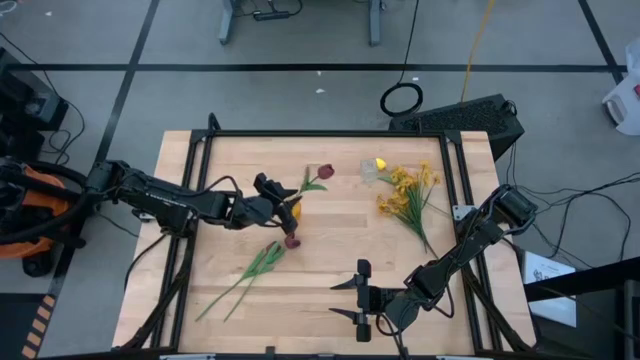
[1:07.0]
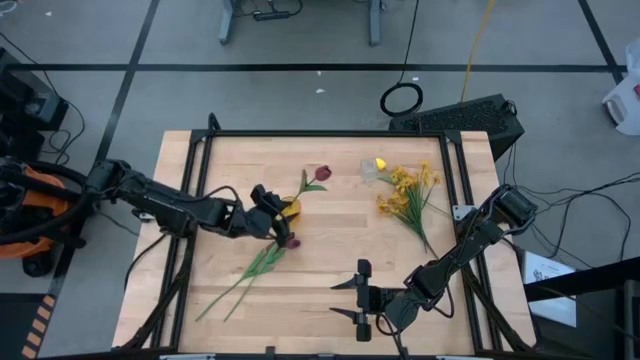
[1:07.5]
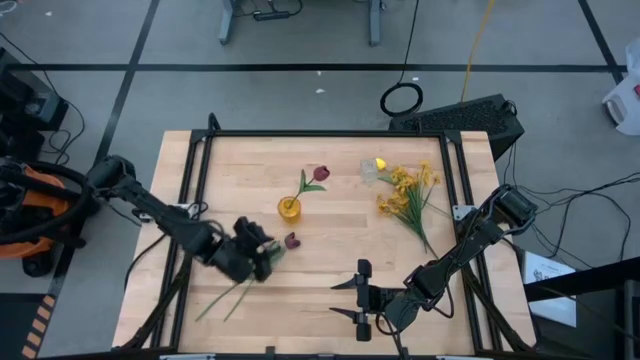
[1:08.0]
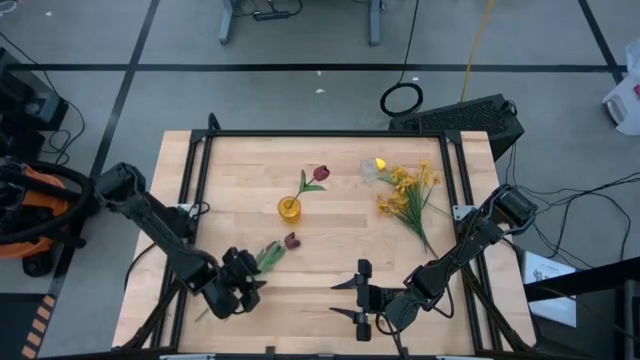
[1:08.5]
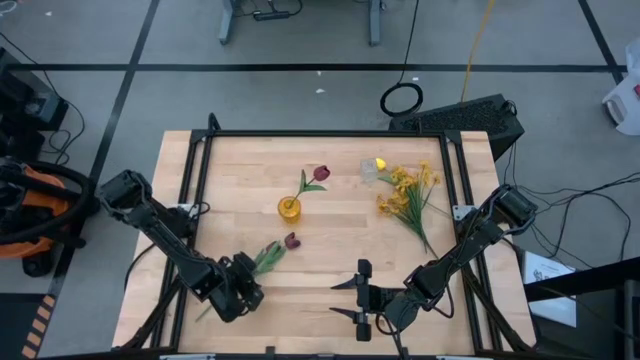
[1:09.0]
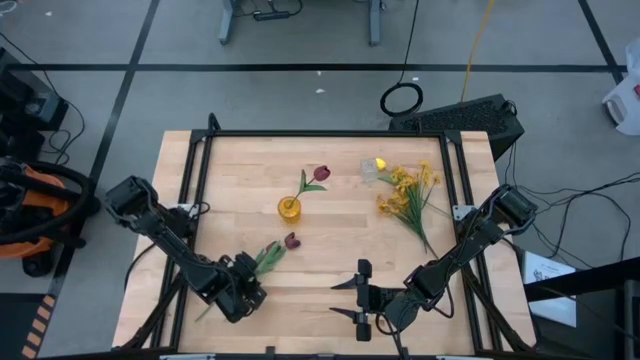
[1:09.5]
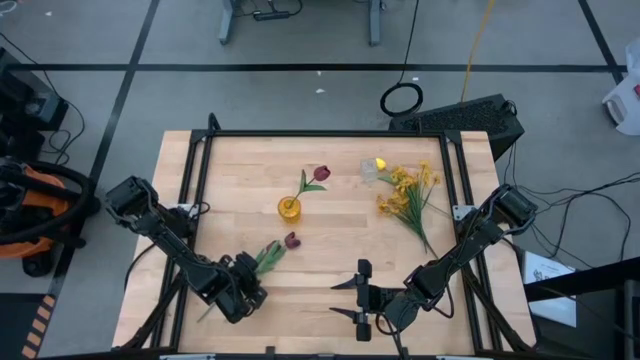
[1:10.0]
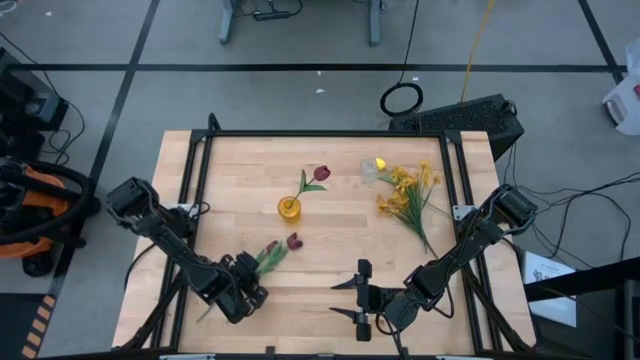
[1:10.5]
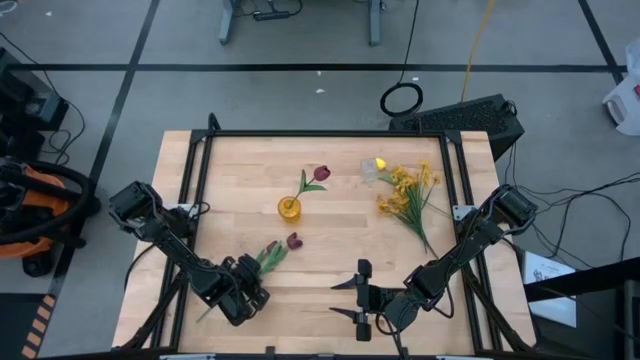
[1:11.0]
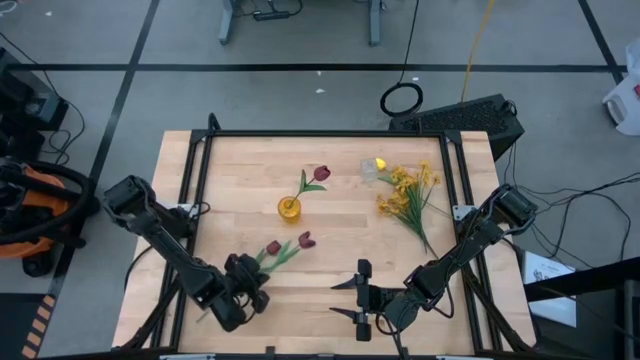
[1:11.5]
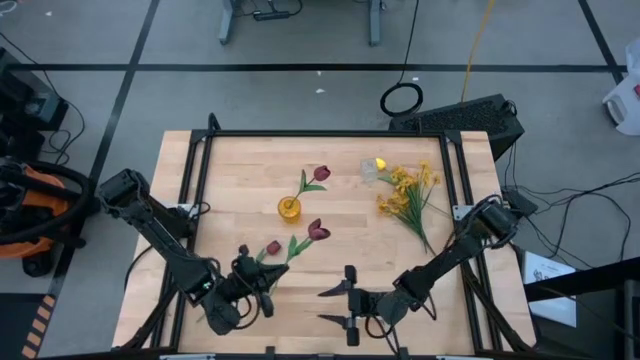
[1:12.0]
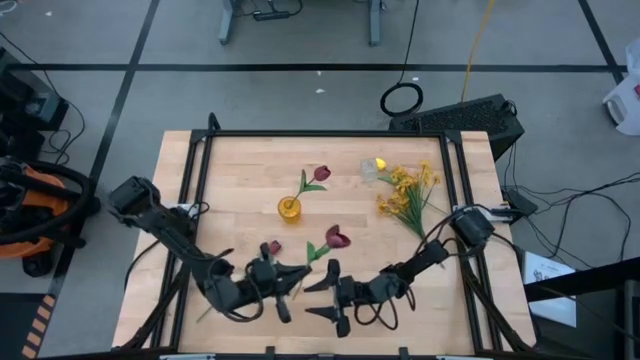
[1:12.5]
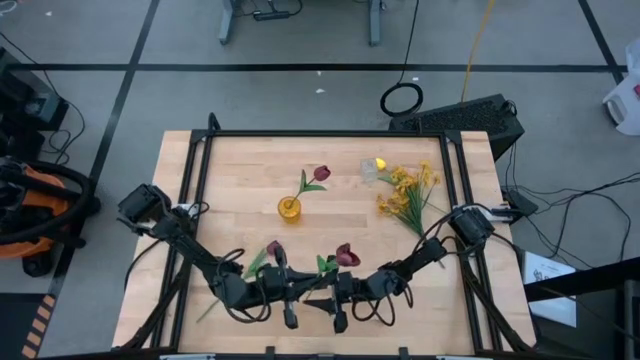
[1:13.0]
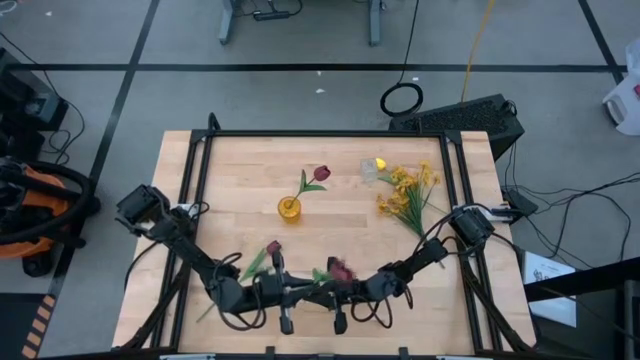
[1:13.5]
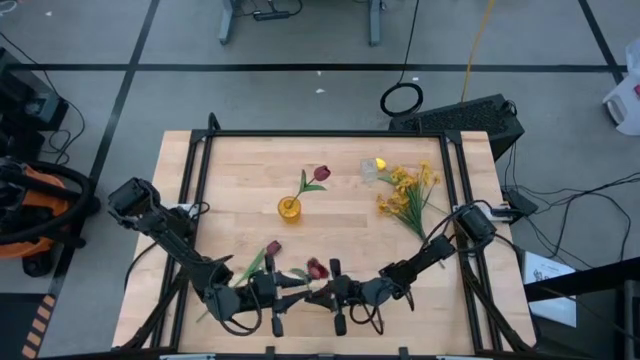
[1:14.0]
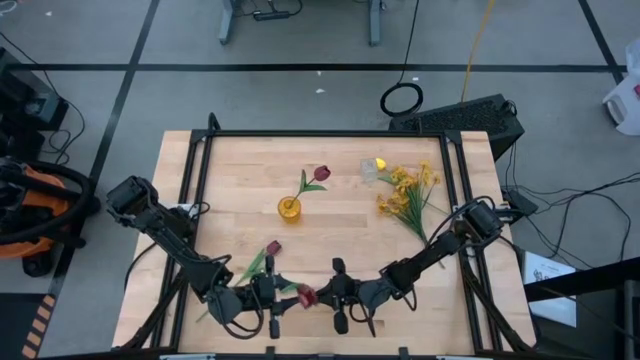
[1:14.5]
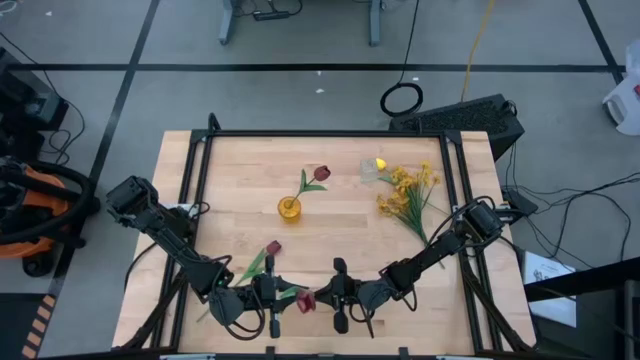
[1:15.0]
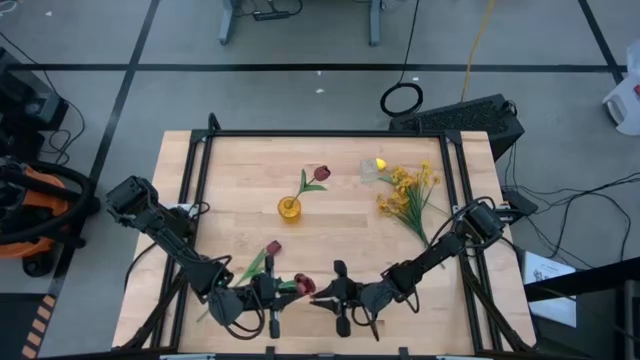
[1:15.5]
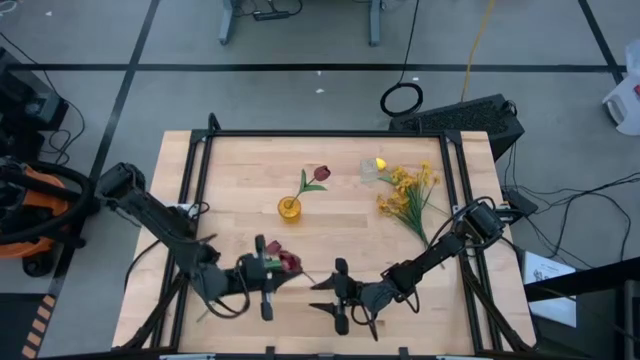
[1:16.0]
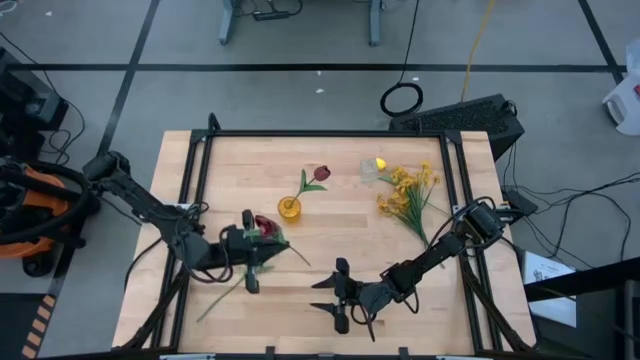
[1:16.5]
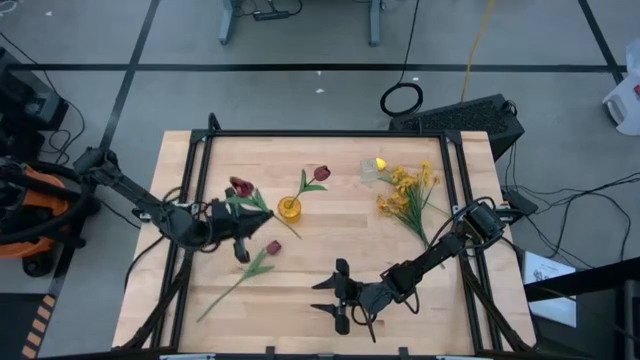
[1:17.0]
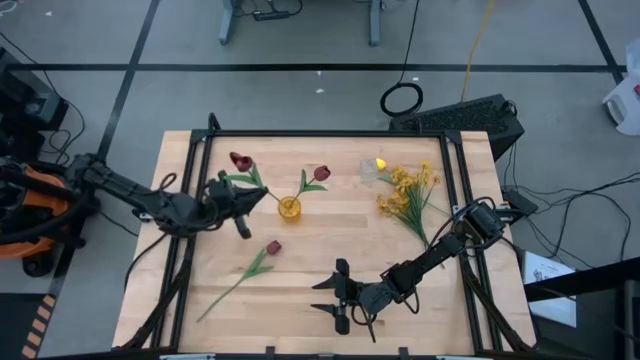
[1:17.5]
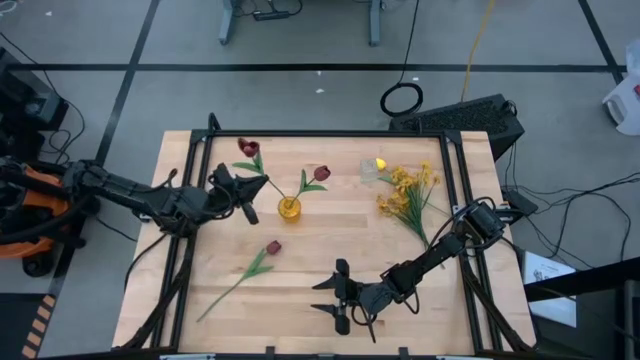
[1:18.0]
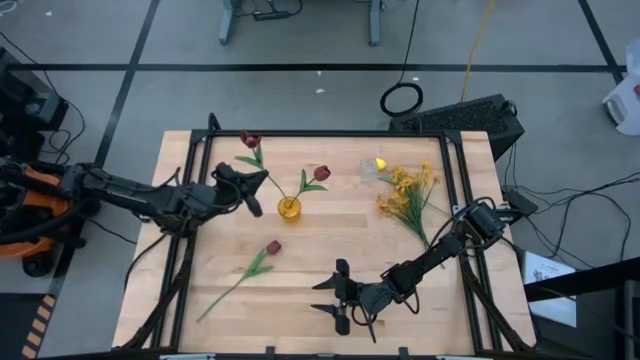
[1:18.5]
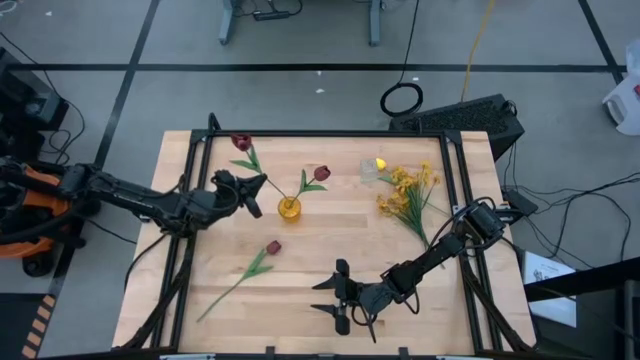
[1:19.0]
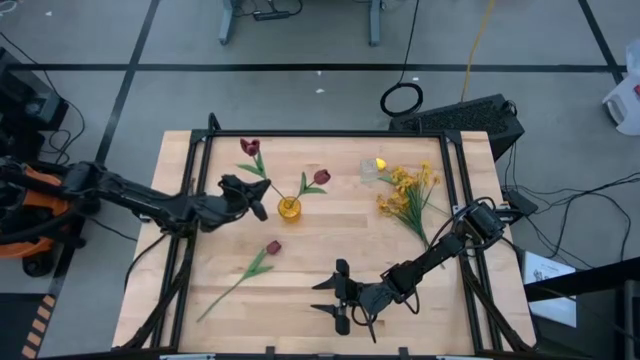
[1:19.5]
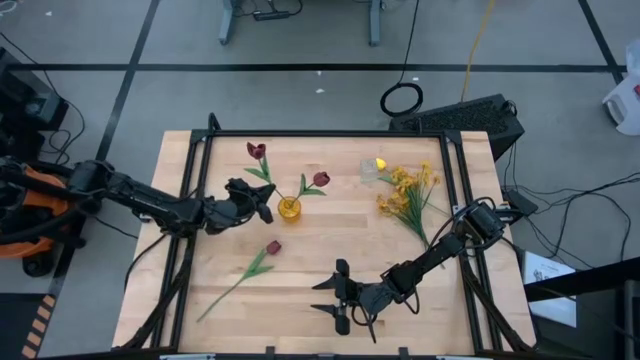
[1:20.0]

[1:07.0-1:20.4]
Task: Sort flowers into vase by color
Put the violet tulip into the yellow vase

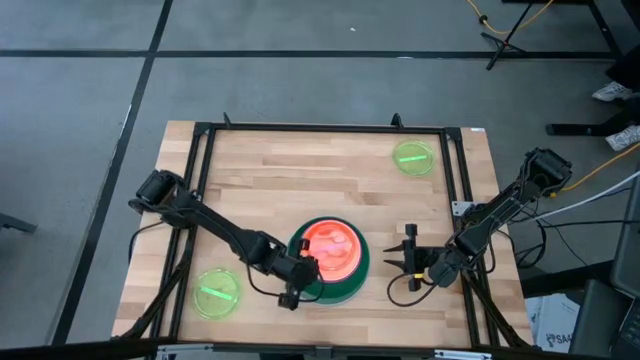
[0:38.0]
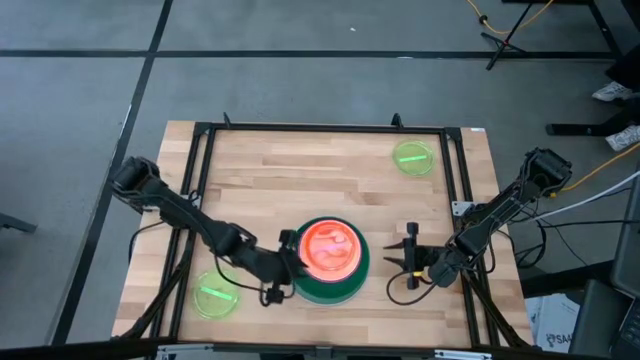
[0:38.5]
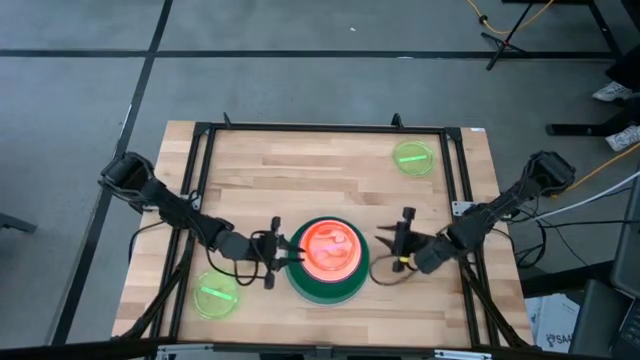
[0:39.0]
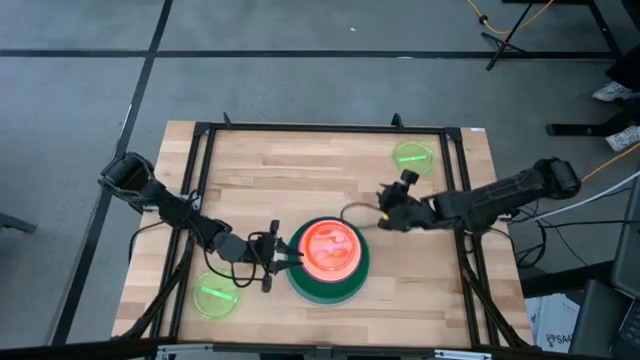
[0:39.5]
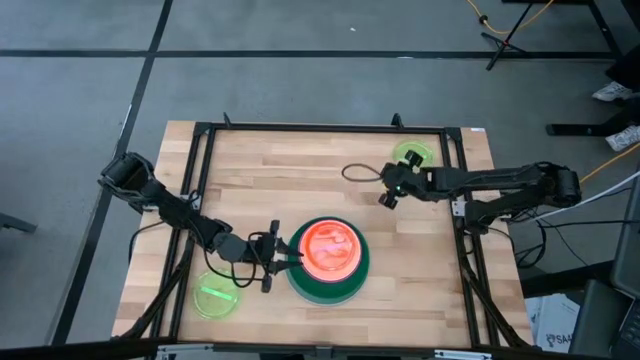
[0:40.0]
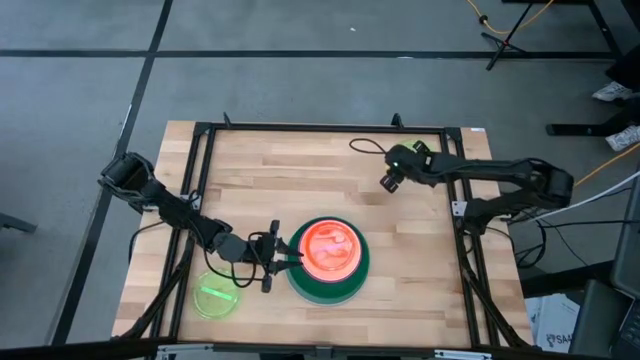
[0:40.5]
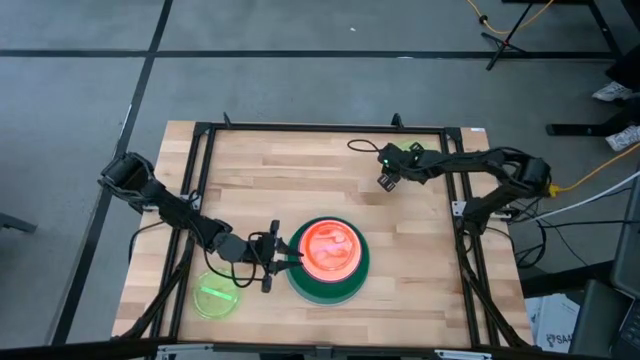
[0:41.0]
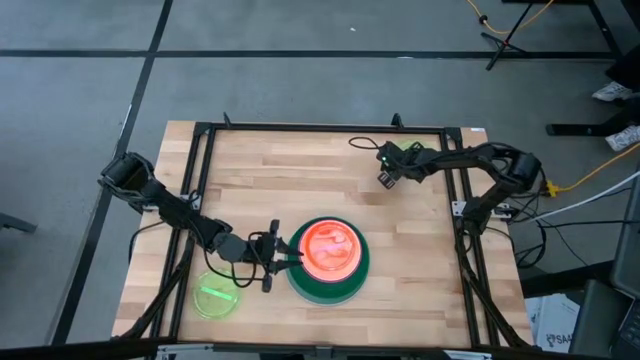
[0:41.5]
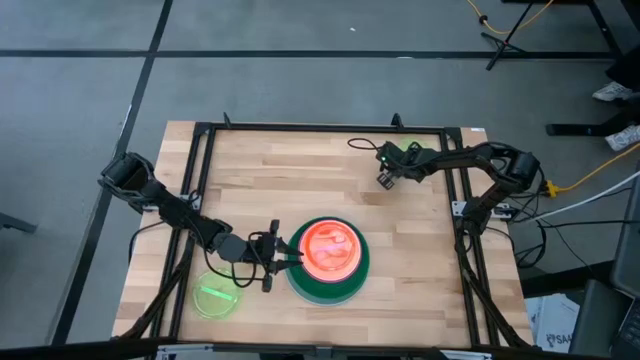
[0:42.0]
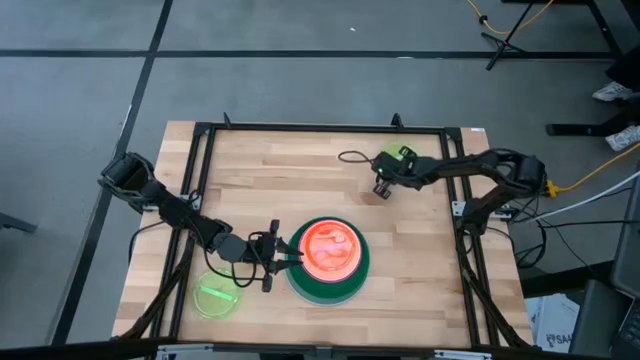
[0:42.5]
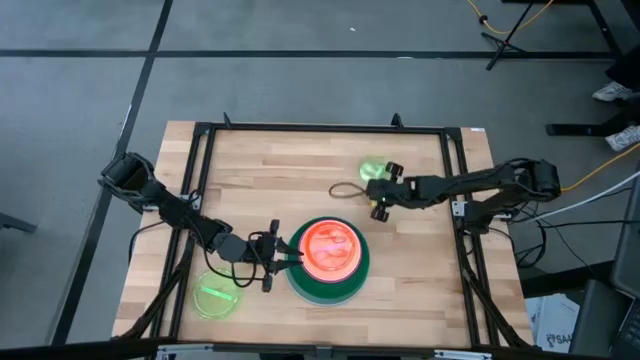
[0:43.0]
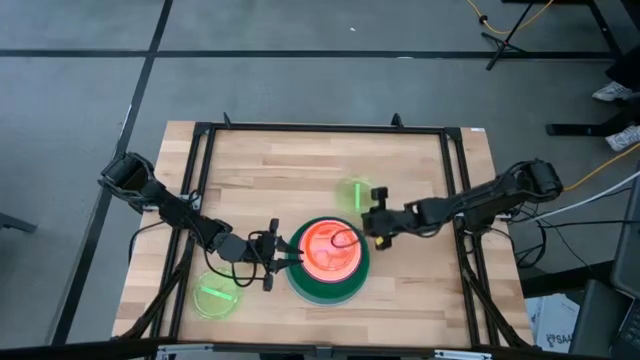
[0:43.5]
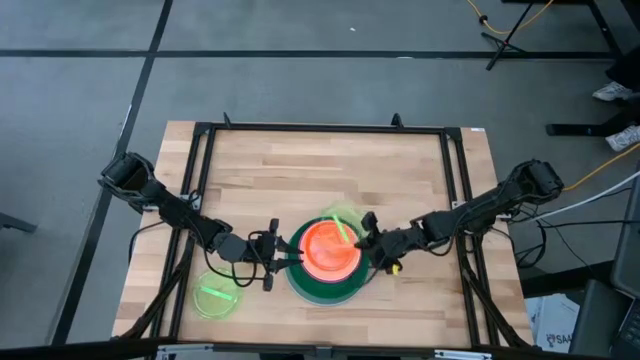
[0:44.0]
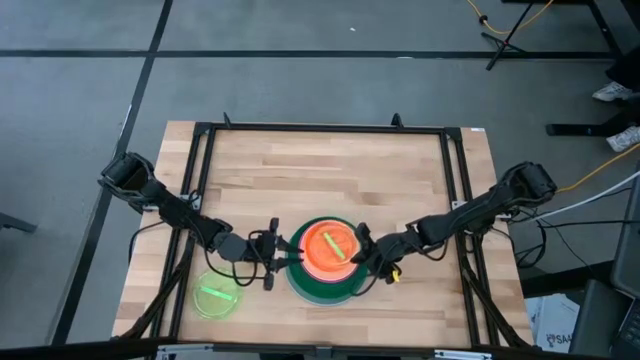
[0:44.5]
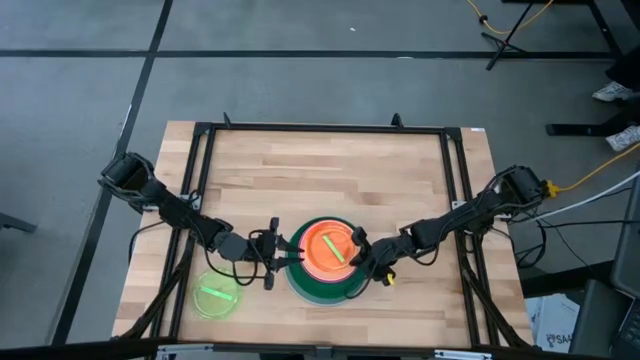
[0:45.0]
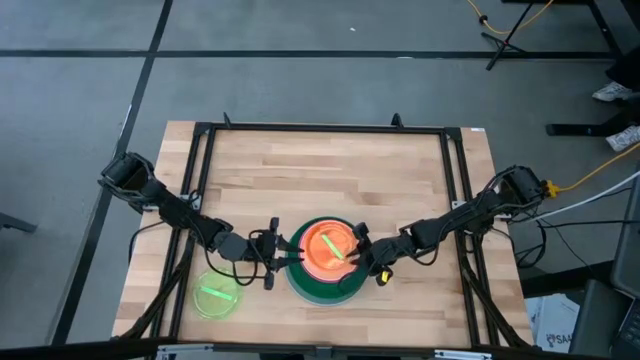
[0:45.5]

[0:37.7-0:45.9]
Task: Stack plastic plates
Stack the top green plate on top of the orange plate
